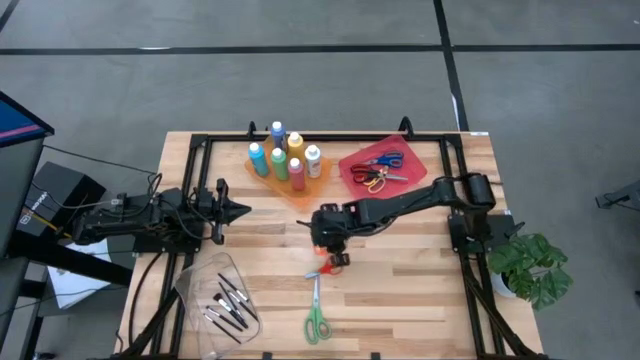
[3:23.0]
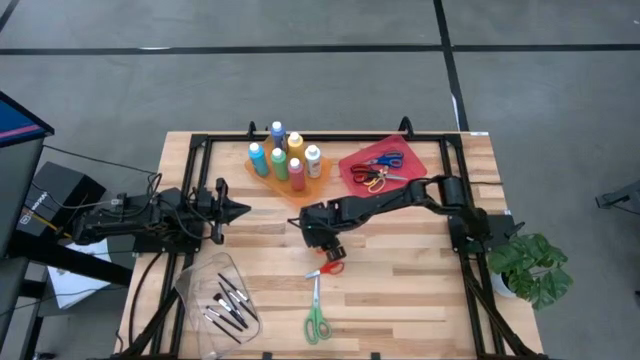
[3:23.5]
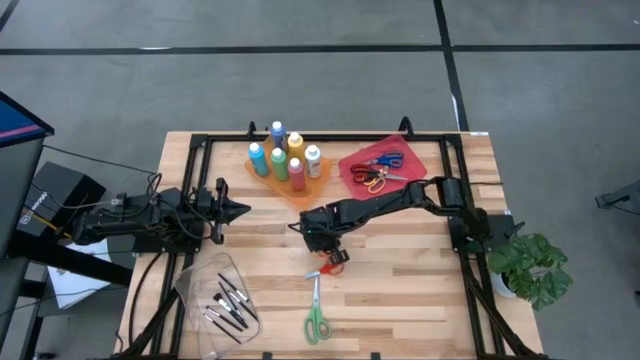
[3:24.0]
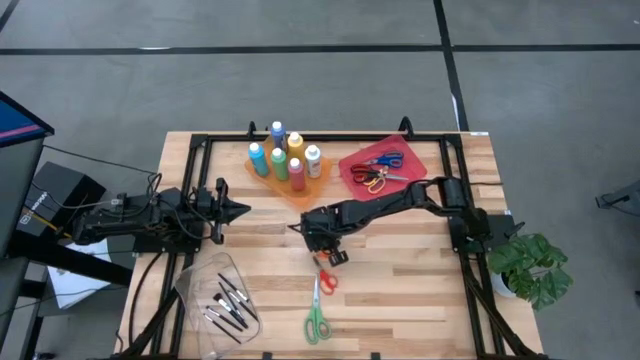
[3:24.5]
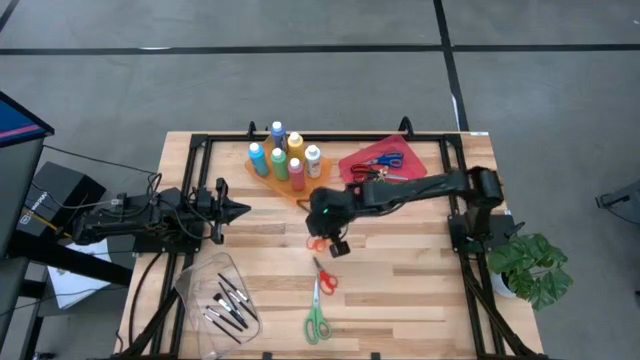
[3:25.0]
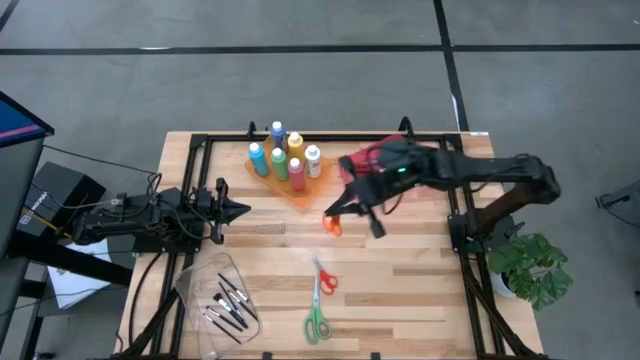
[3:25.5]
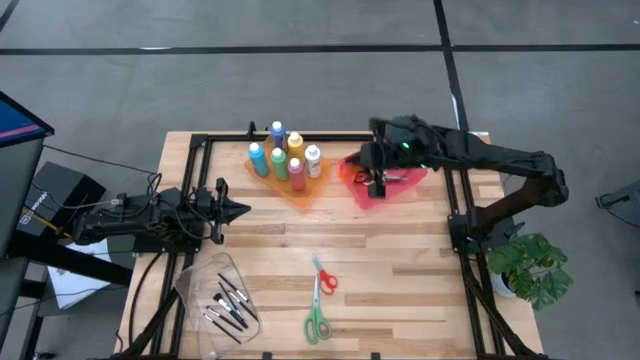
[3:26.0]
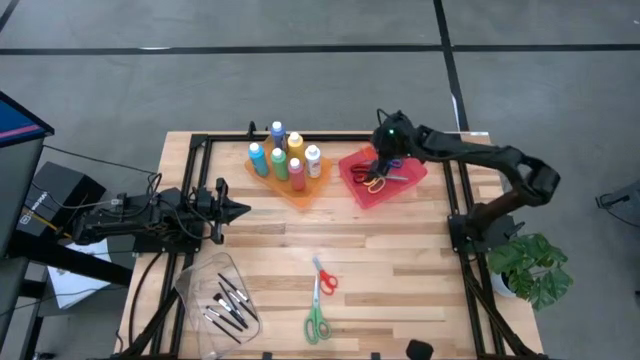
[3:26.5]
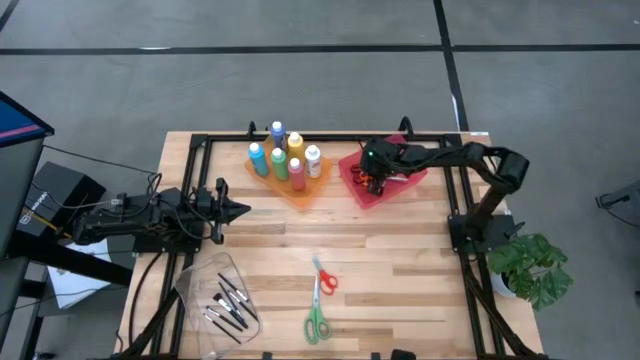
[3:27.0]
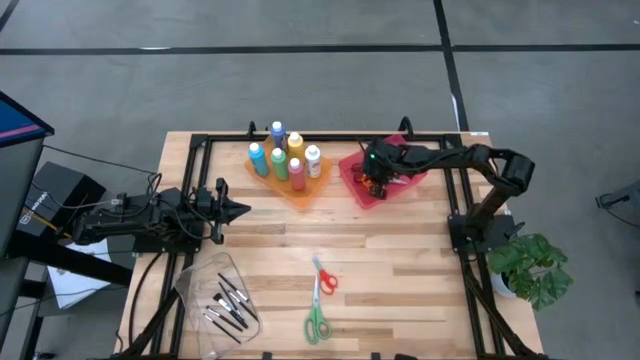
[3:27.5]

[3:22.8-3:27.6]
Task: Pick & Place Paint Supplies
Put the orange scissors into the pink bin

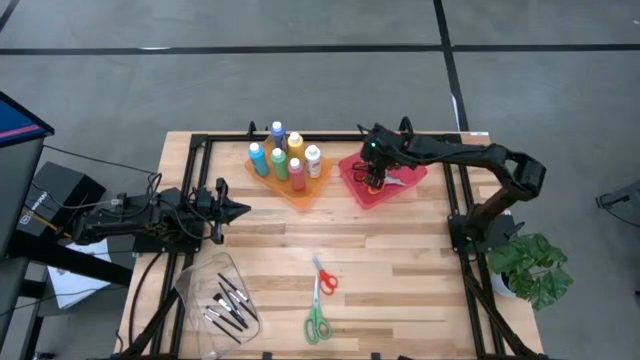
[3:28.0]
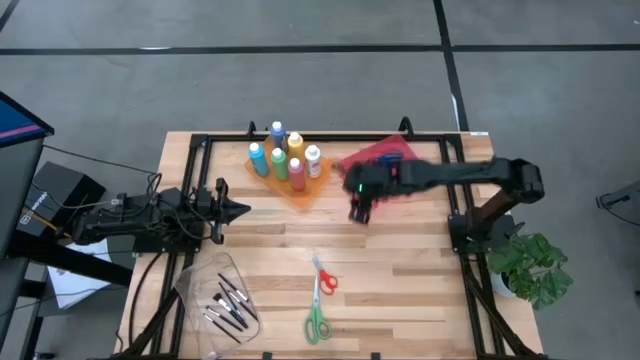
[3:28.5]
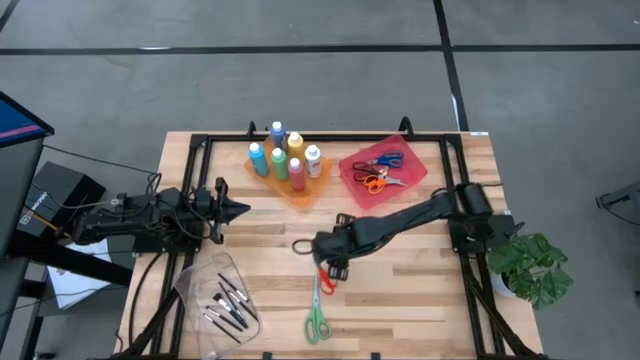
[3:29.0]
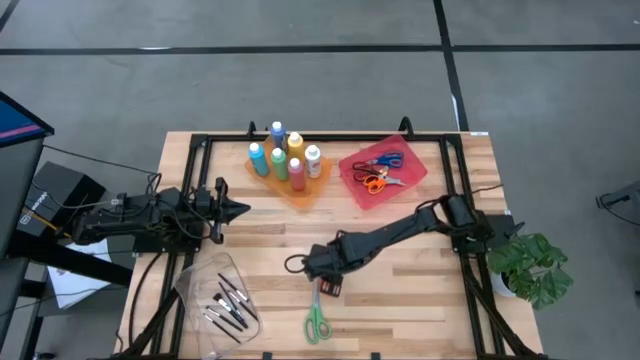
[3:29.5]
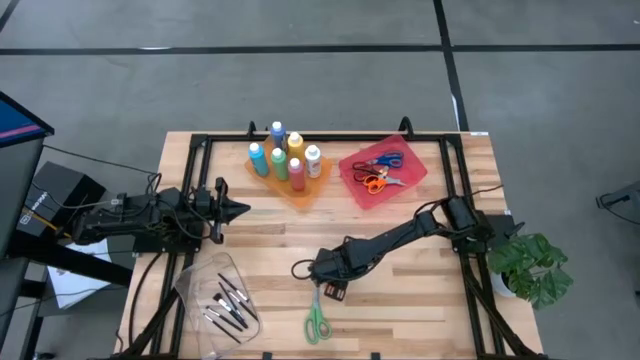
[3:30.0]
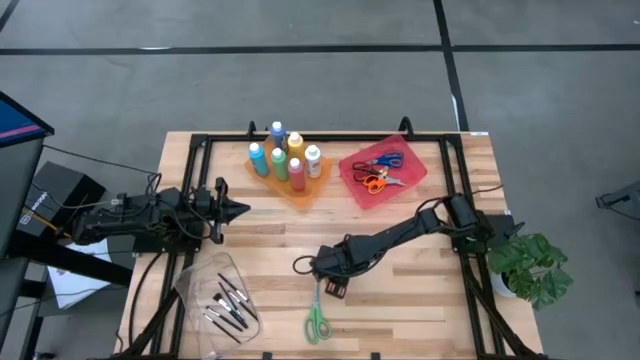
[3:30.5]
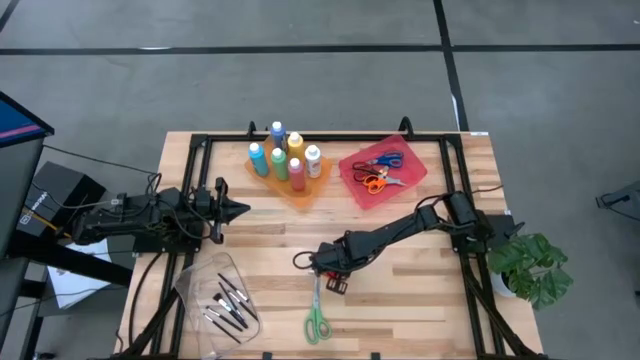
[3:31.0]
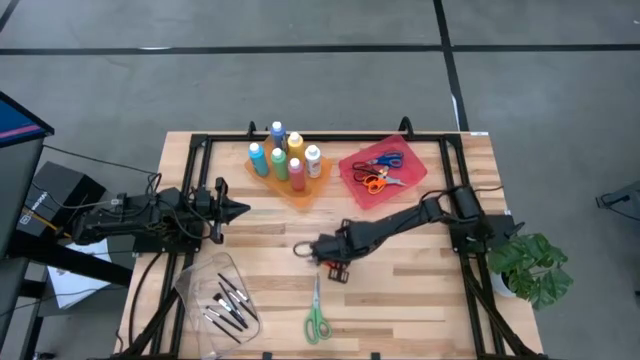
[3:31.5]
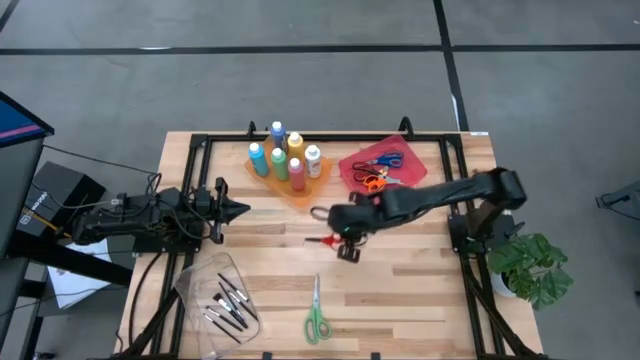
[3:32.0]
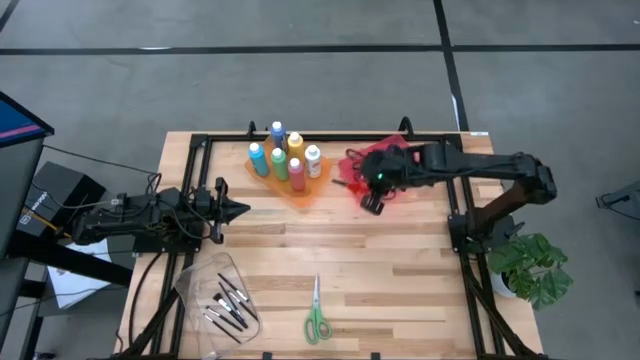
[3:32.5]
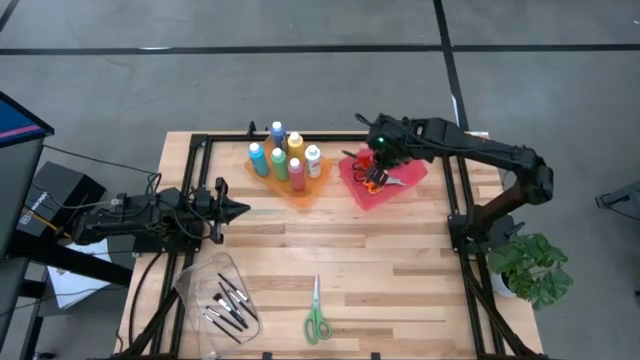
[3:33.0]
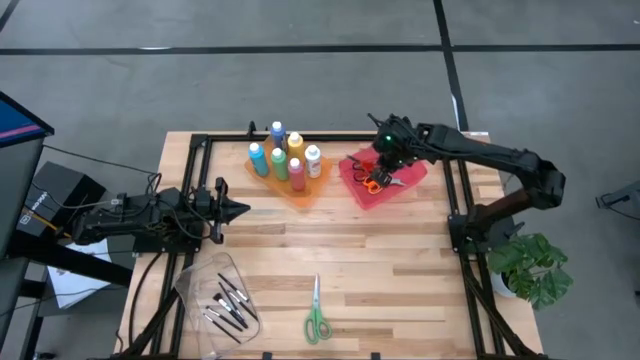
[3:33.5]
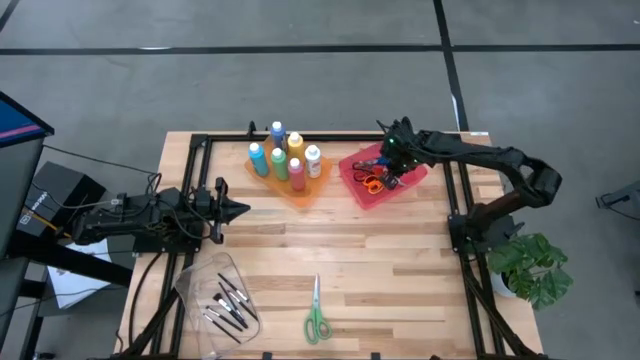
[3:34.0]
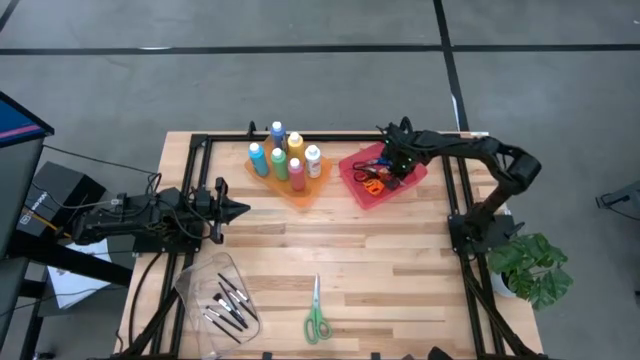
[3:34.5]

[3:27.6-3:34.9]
Put the red scissors into the pink bin

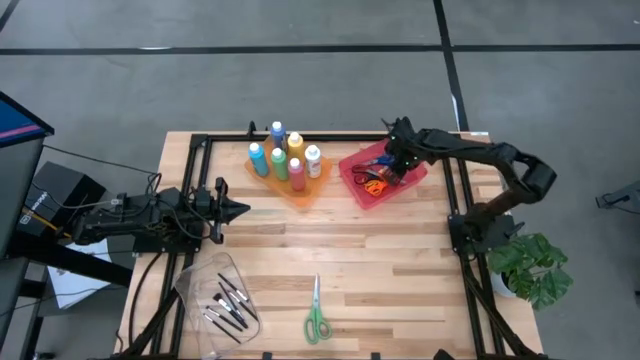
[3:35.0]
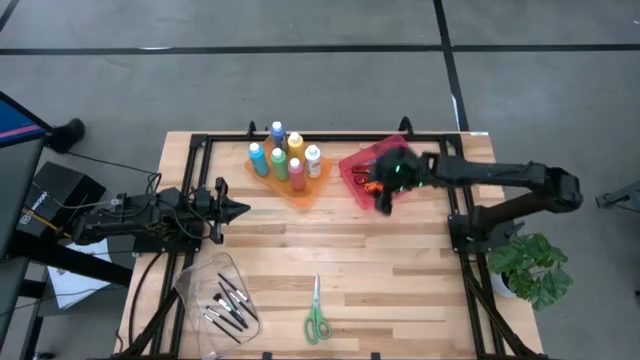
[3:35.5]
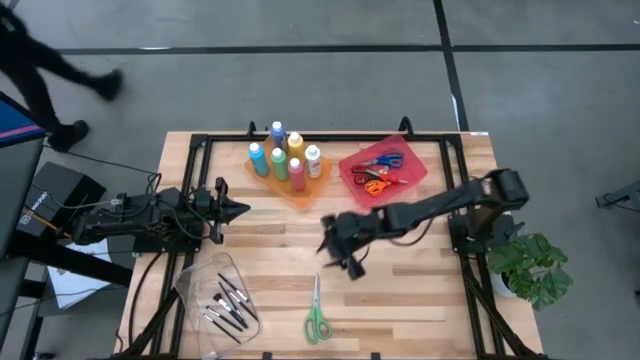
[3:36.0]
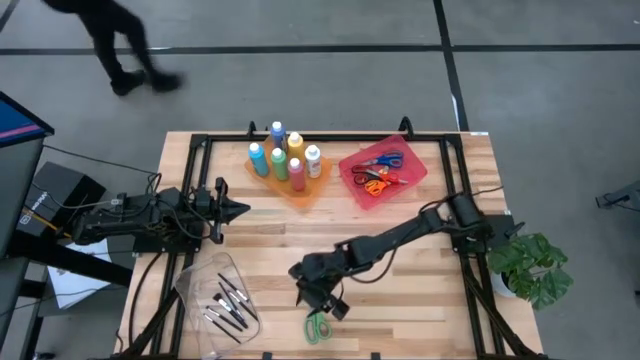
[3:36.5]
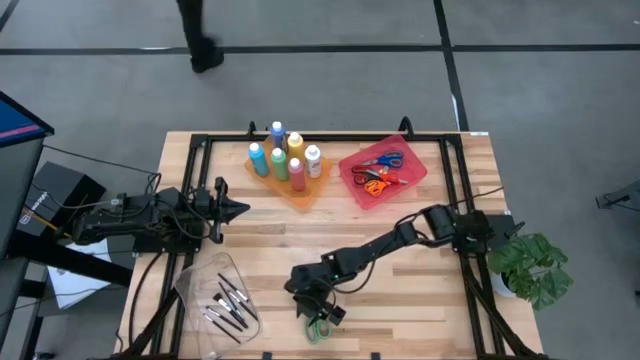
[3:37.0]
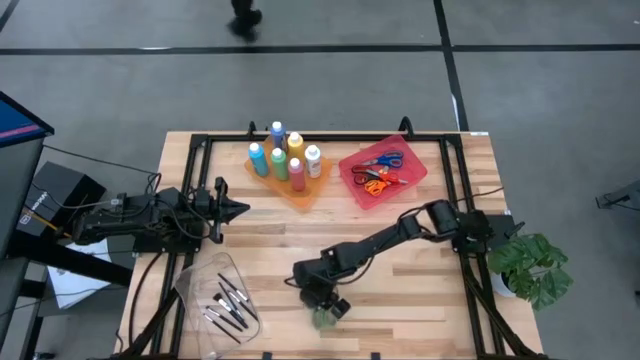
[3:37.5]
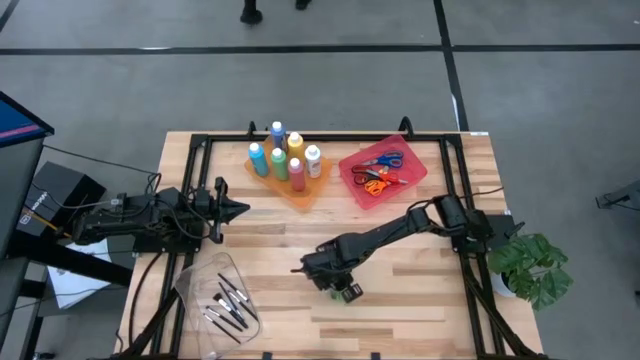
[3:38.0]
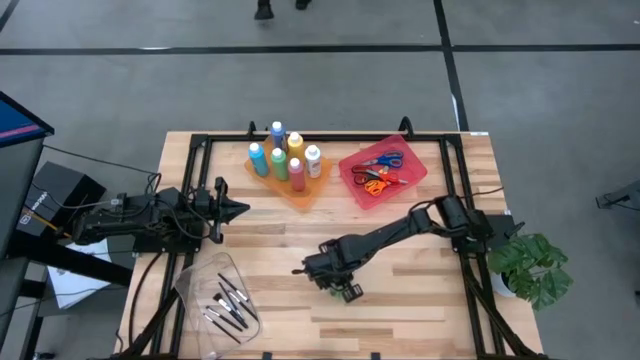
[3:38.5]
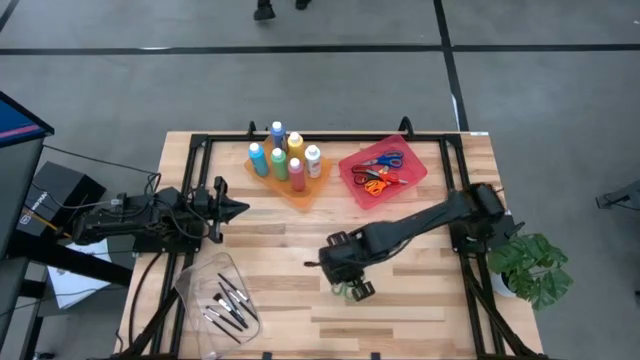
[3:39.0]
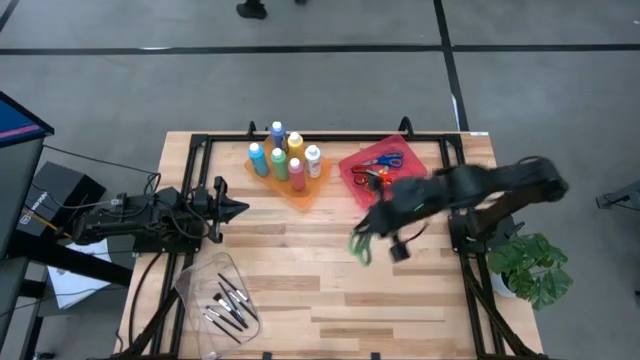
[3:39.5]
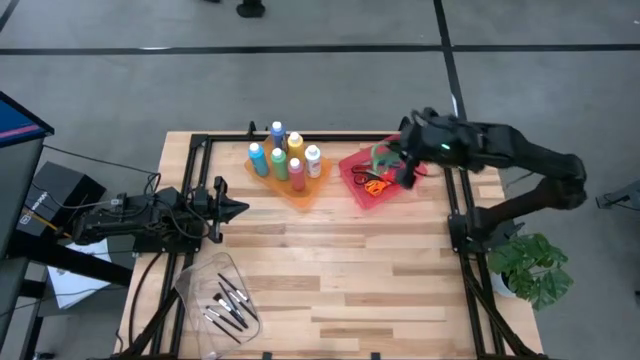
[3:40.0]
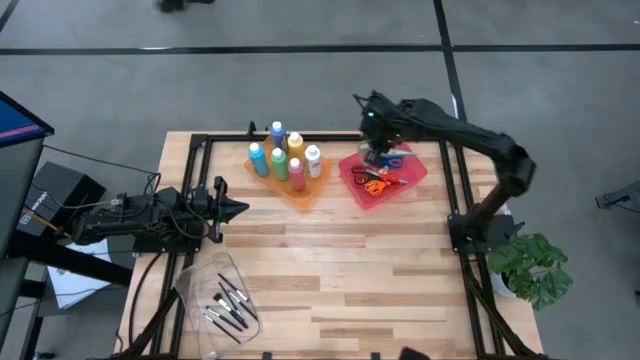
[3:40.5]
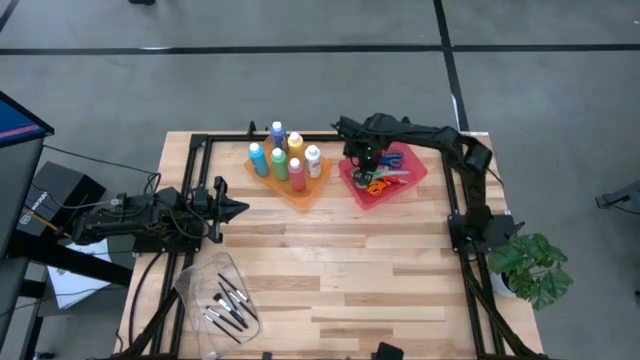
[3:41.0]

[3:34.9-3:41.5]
Put the green scissors into the pink bin

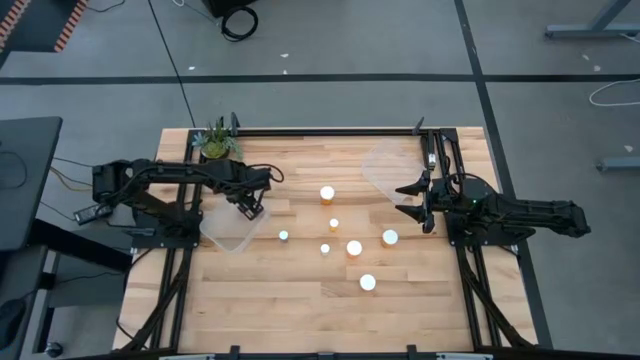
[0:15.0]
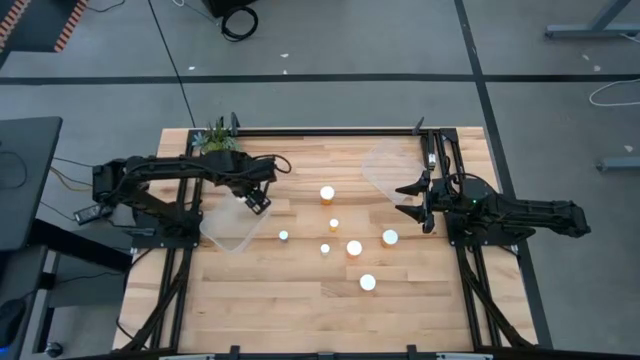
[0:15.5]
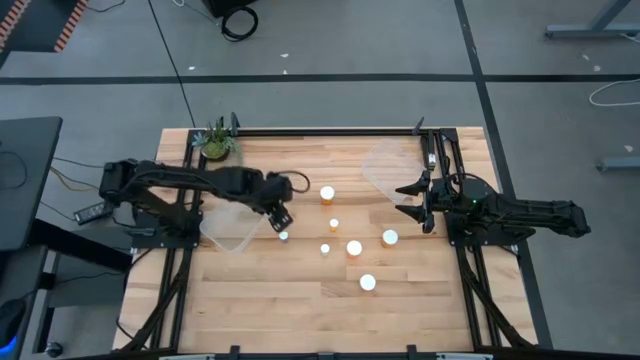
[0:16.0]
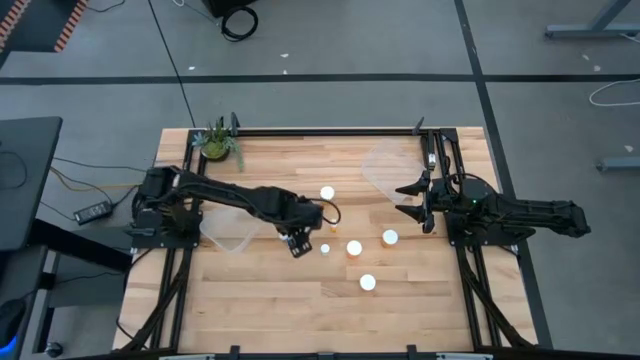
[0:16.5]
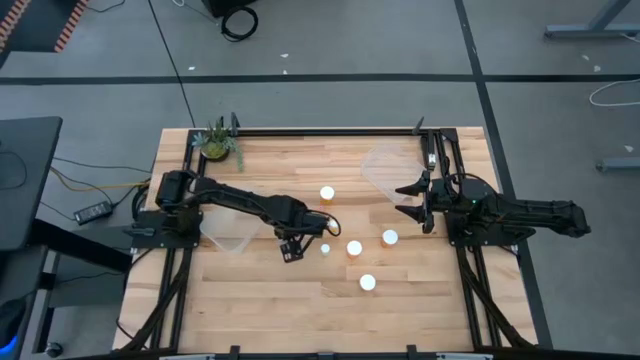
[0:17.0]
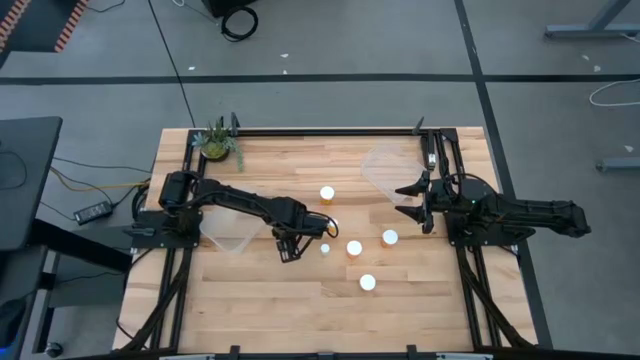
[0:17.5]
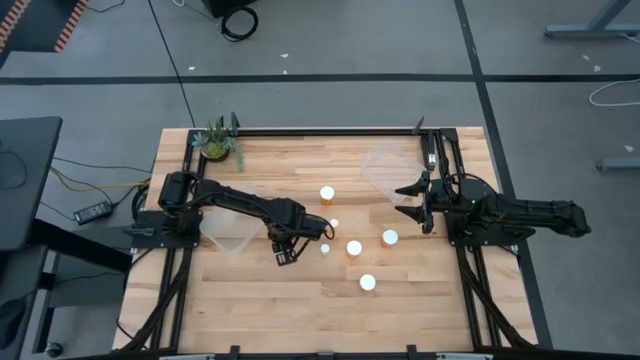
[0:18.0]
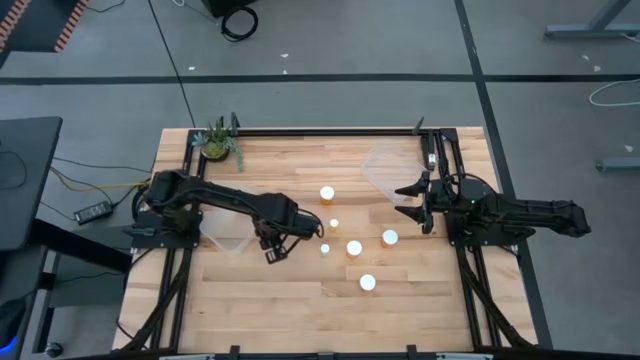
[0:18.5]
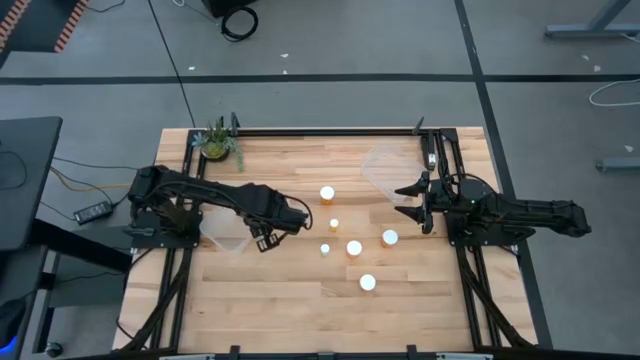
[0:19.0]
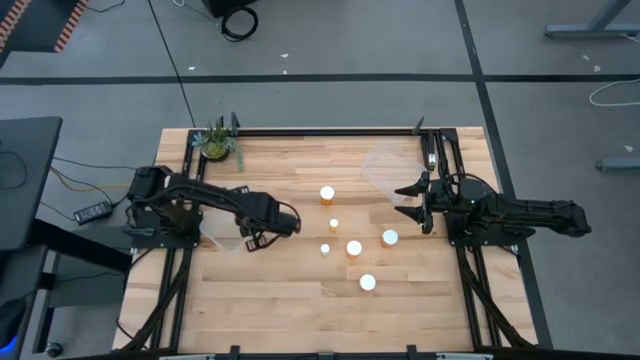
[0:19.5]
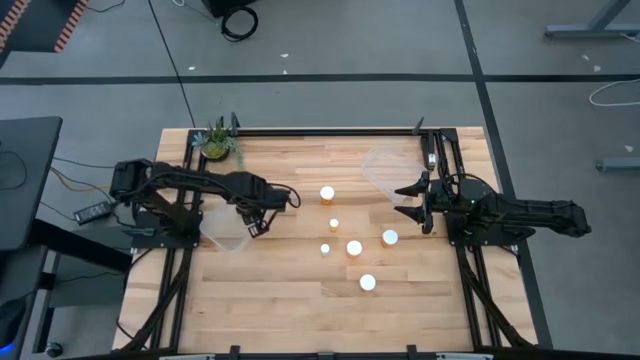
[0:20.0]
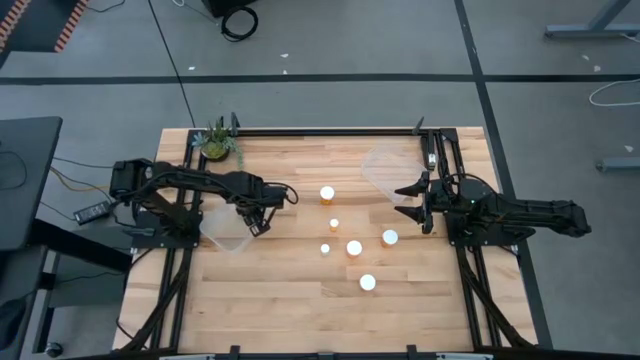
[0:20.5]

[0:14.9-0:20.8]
Task: Pick and place medicine bottles into bin by pill shape (circle, oval)
Put the small blue pill bottle into the left transparent bin
